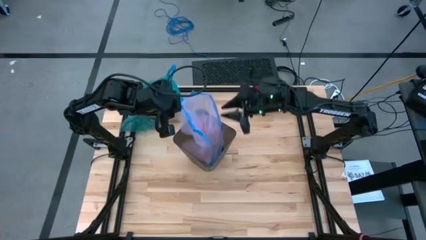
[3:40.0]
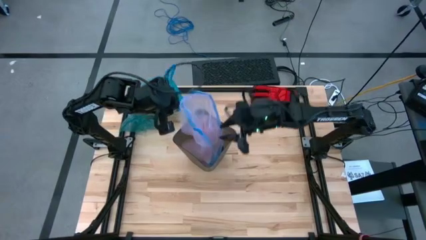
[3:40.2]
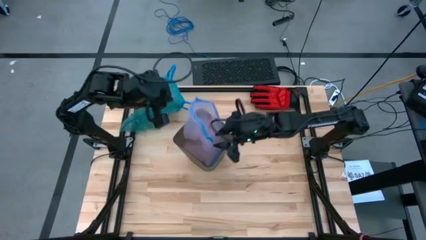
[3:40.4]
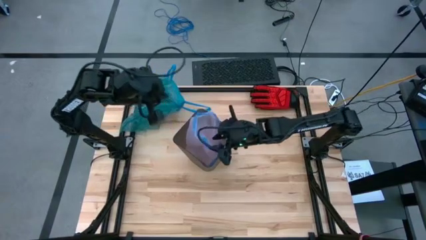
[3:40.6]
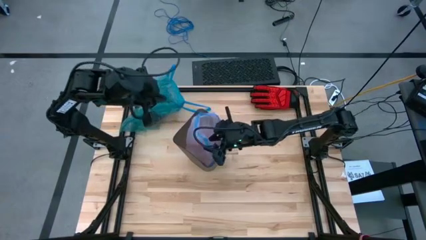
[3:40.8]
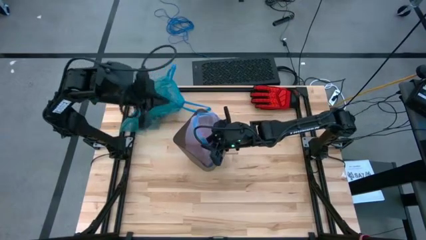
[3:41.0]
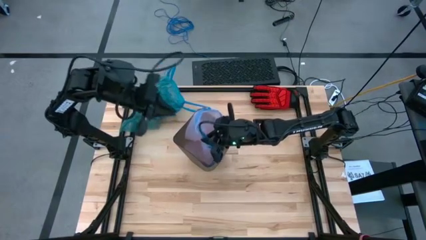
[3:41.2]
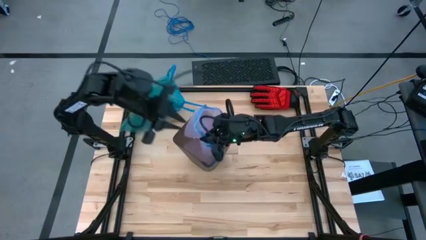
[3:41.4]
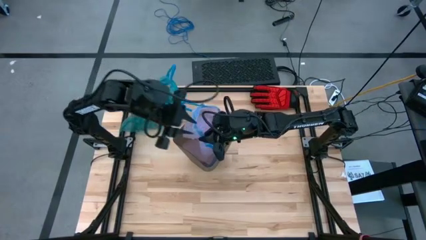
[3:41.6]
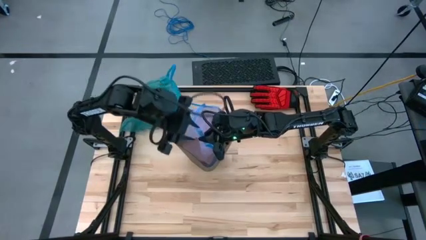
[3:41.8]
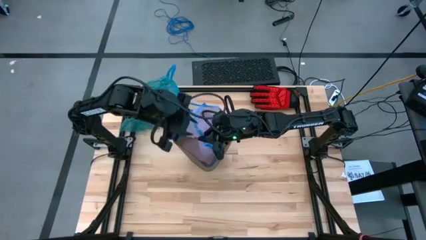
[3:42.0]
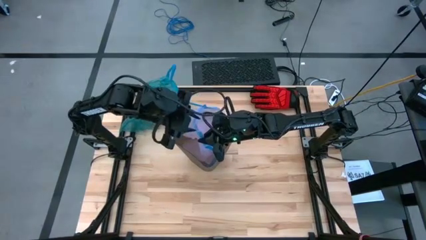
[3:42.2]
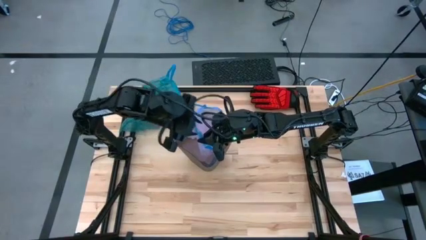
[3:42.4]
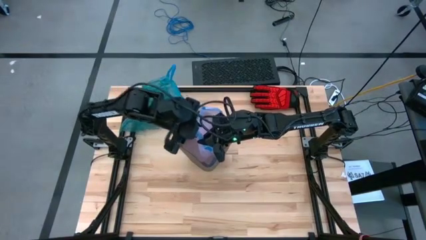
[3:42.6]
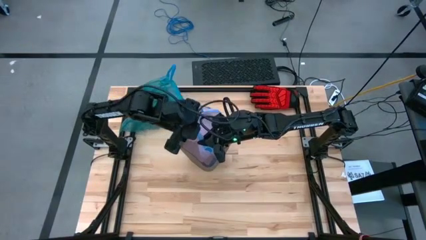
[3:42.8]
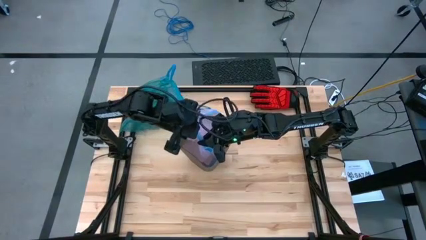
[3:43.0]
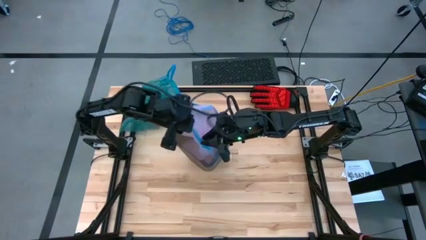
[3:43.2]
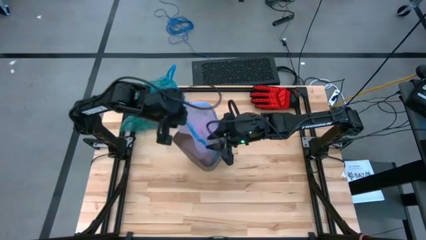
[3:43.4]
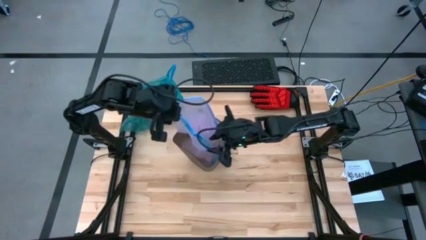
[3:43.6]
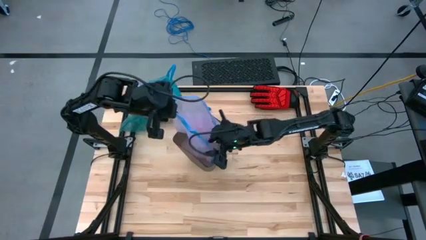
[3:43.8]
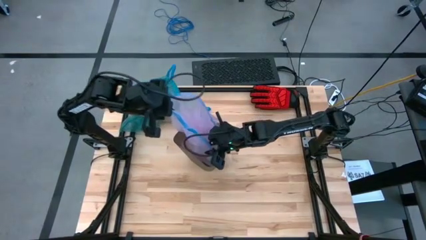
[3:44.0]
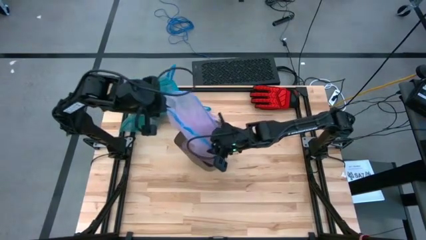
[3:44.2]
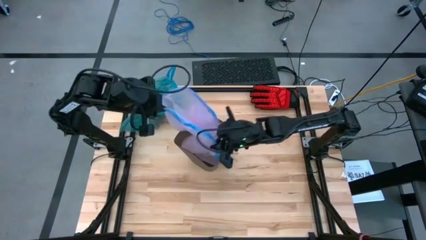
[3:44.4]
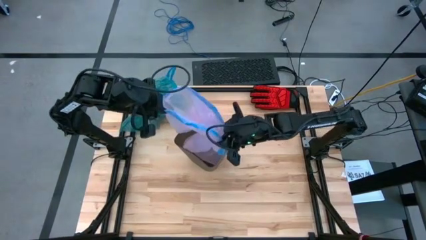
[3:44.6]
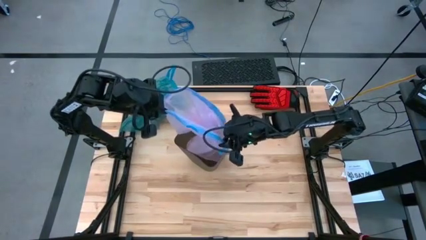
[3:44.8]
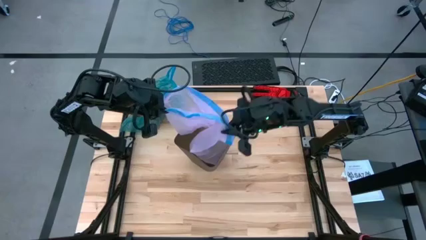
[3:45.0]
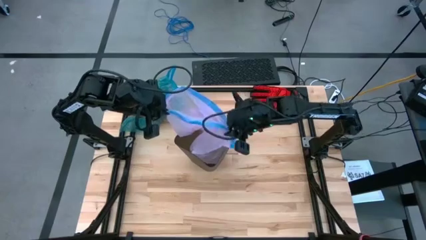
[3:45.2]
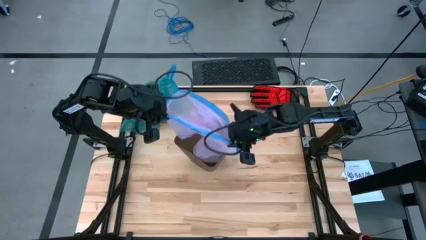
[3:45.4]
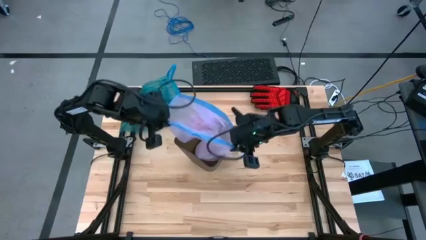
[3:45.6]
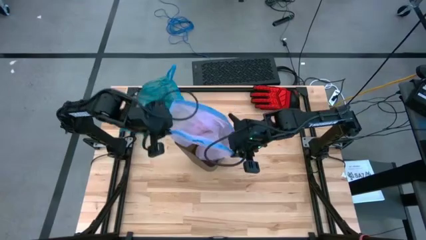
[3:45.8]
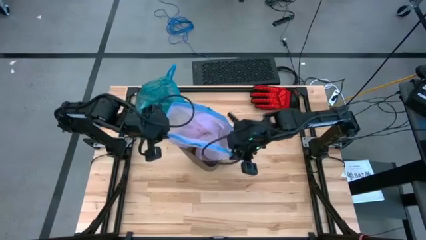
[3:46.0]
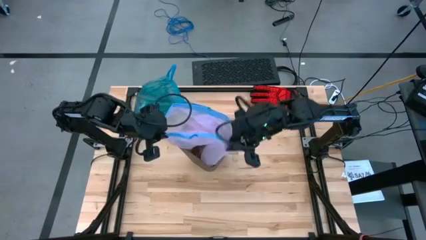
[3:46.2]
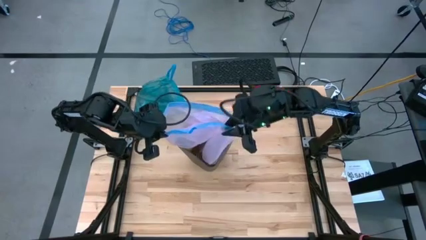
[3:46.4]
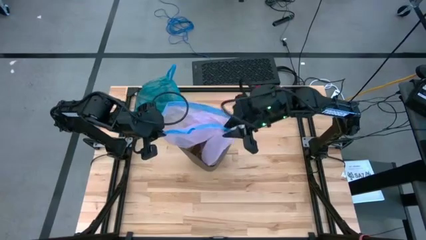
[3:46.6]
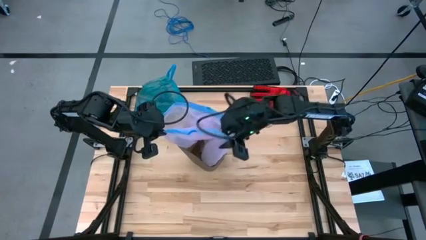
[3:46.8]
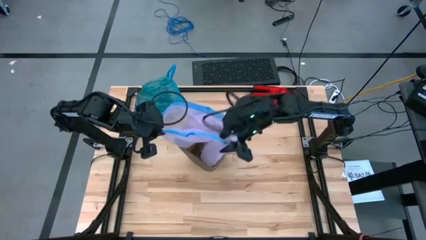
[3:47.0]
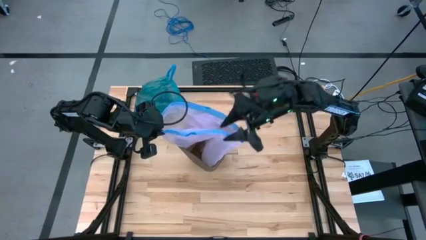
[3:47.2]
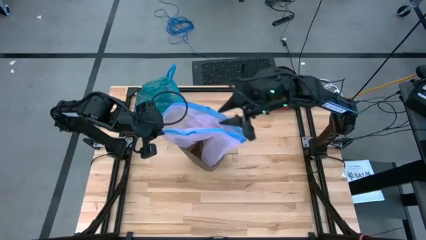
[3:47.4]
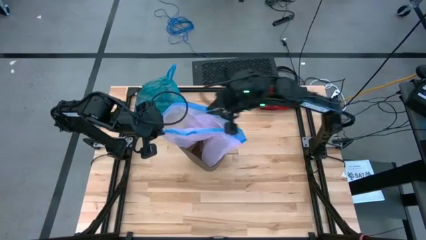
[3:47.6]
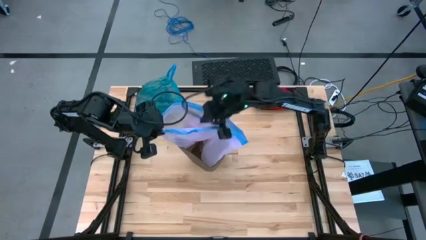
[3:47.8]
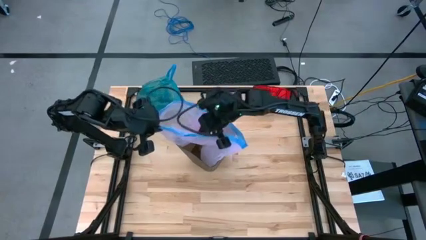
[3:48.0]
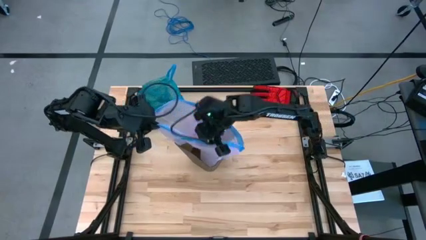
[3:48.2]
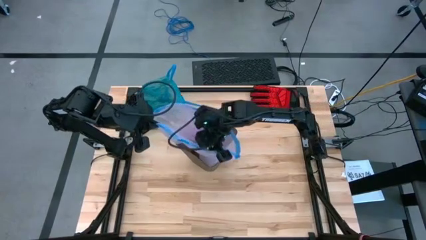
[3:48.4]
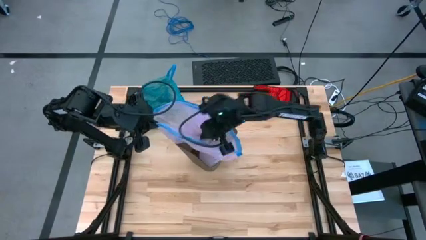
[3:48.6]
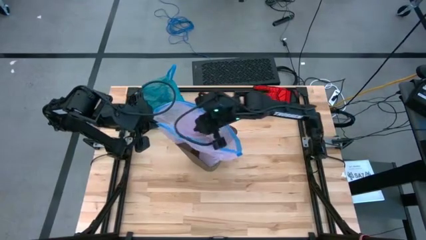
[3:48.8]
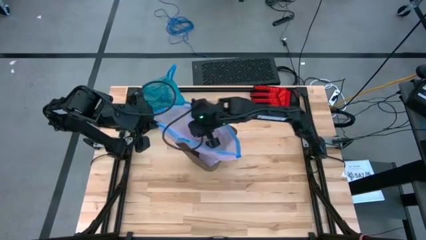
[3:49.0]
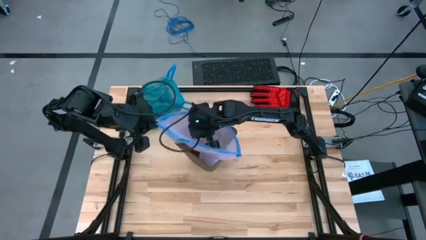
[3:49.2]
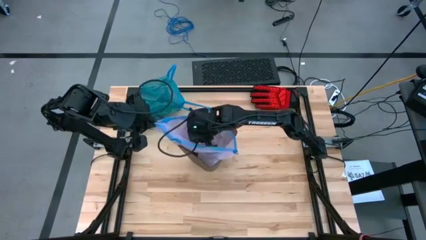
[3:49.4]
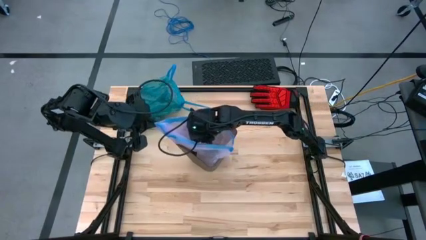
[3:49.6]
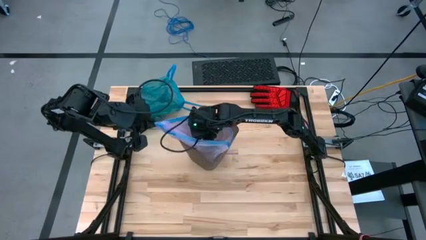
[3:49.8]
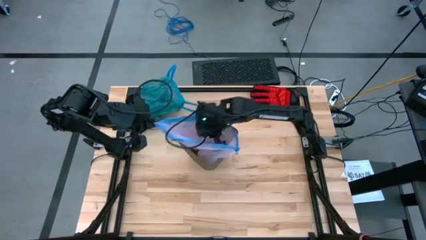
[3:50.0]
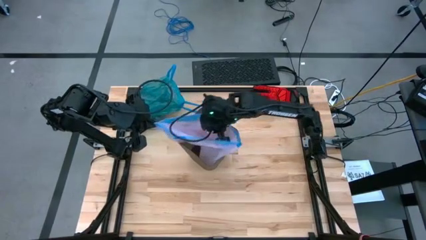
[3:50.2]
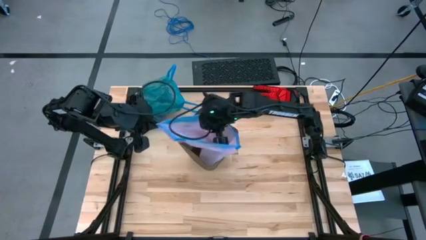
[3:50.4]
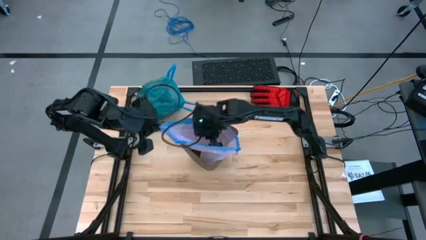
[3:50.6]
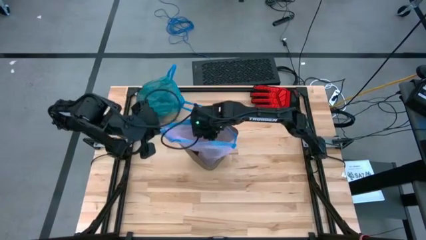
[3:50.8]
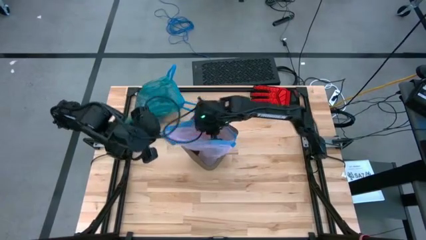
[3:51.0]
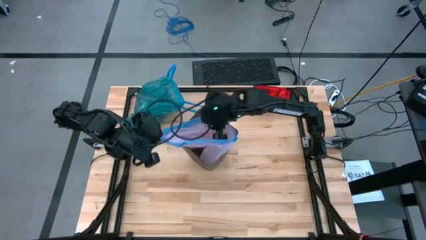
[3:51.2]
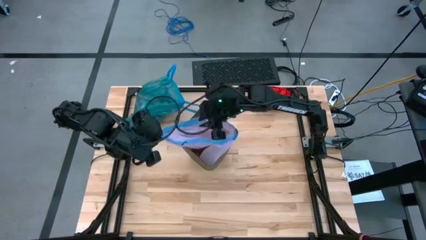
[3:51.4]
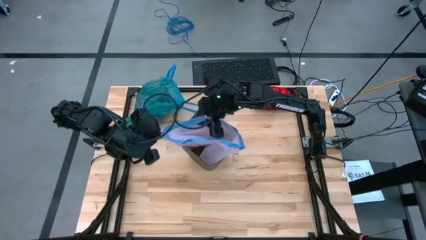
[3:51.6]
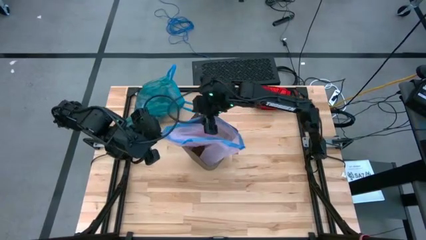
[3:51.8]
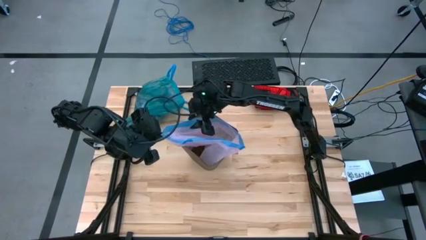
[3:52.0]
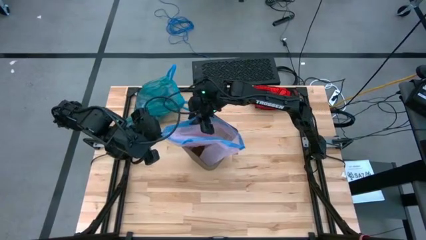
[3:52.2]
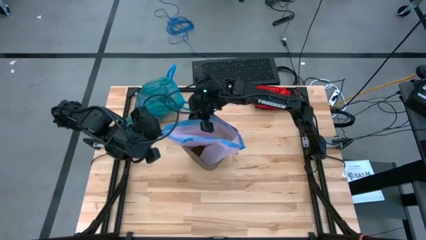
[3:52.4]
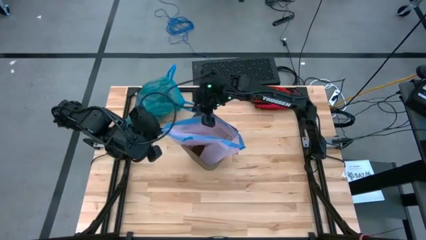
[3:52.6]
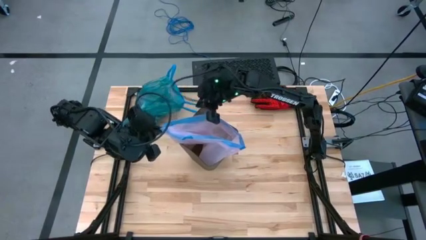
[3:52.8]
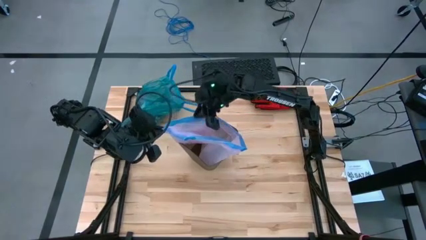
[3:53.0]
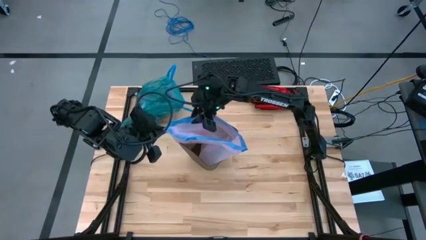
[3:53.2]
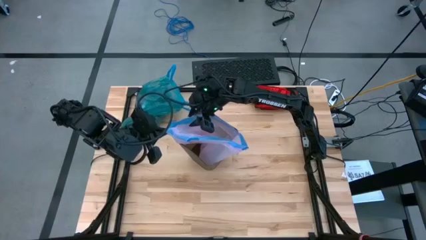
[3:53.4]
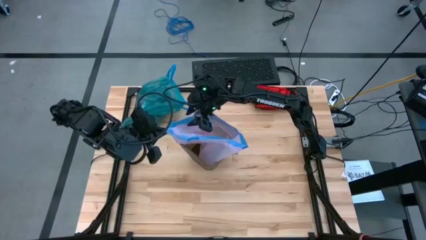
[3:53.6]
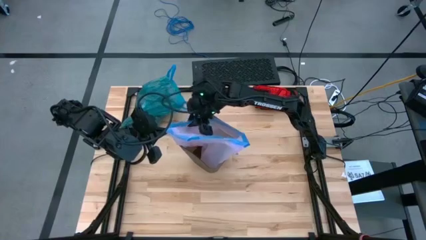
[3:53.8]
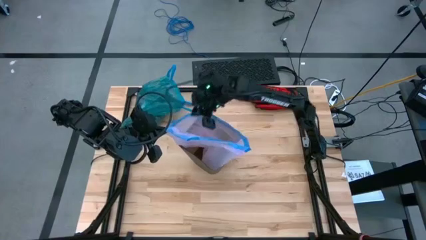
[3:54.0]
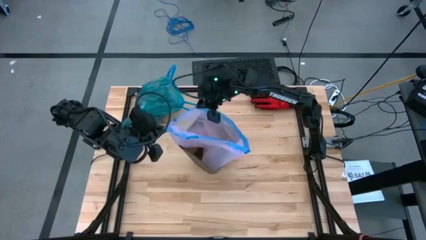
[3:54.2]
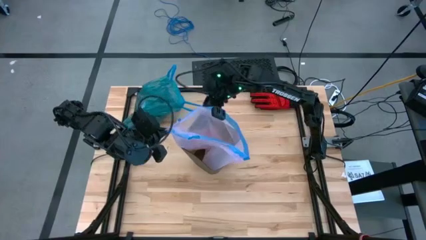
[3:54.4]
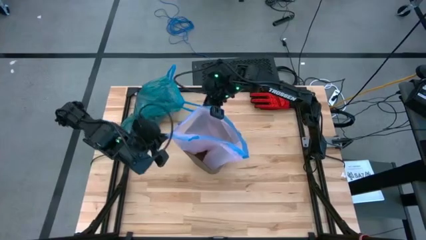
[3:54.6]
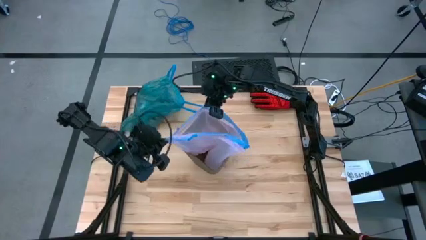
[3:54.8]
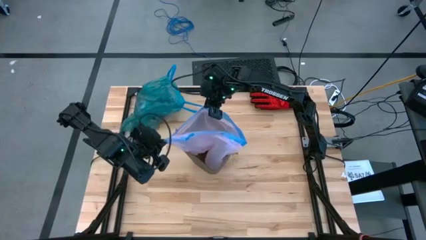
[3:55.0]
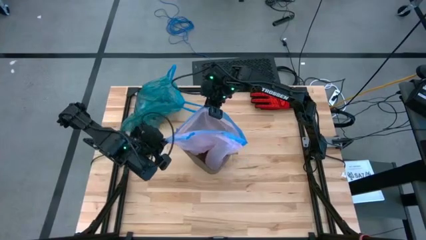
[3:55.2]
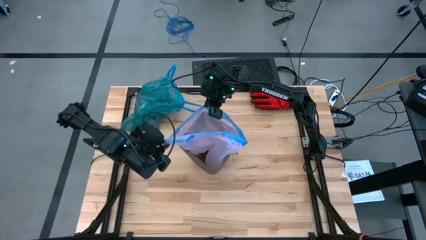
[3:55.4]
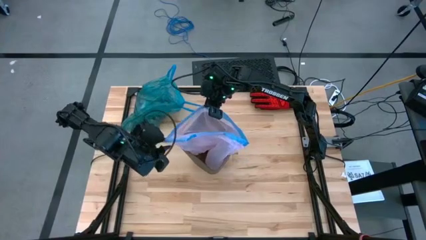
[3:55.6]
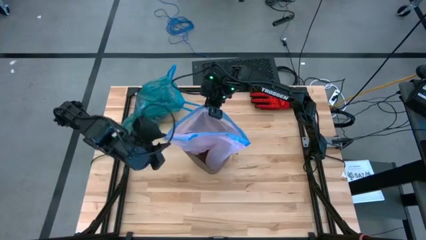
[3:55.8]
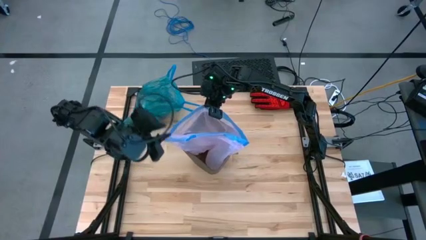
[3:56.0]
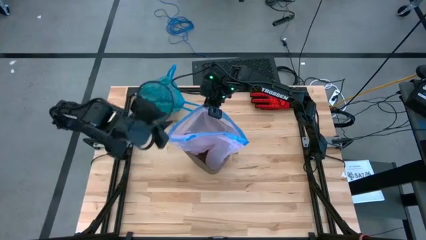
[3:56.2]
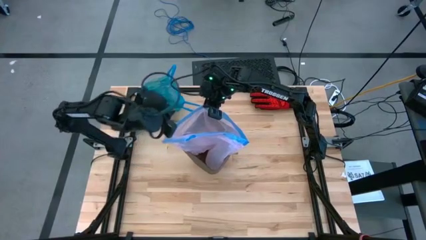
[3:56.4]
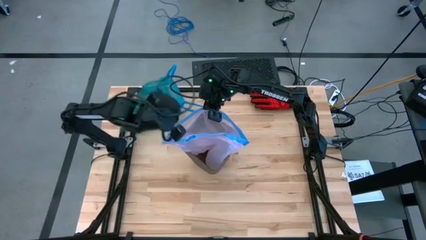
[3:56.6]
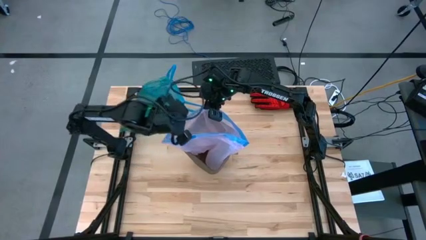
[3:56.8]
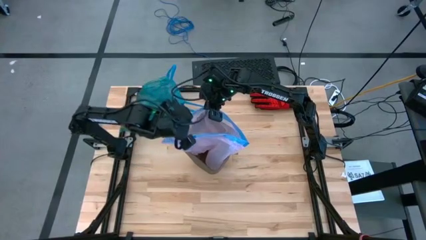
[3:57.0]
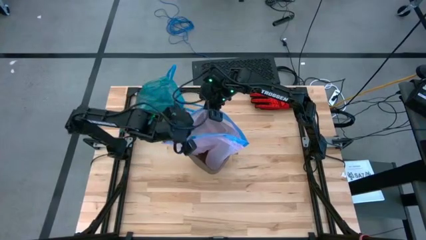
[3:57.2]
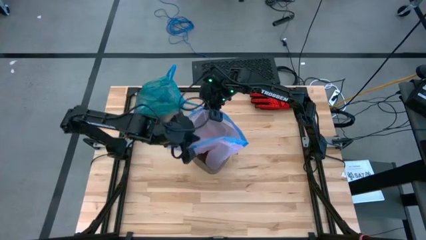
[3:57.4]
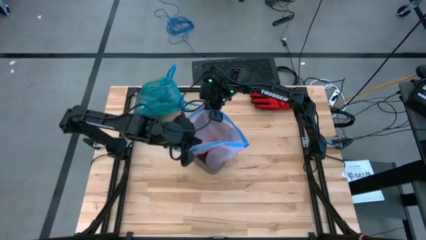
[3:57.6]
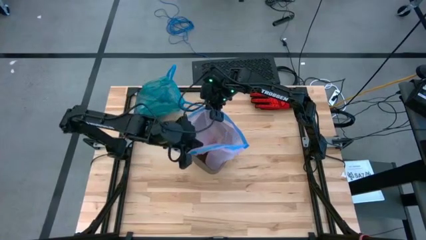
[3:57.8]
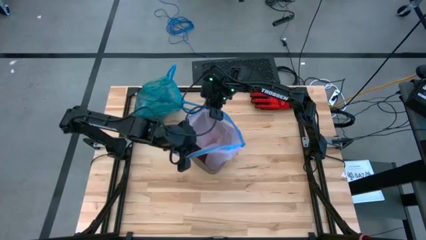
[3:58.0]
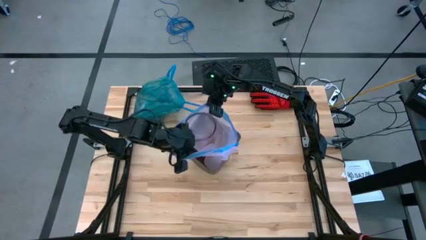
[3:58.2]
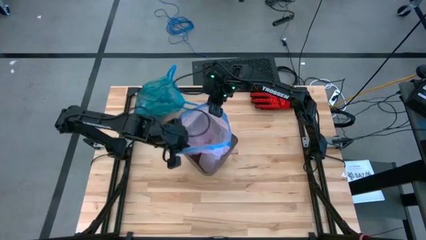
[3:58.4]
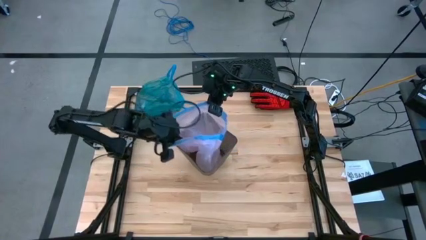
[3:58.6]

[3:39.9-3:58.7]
Task: place trash/remove bag and relplace
Insert a new pink trash bag into the black trash bin
